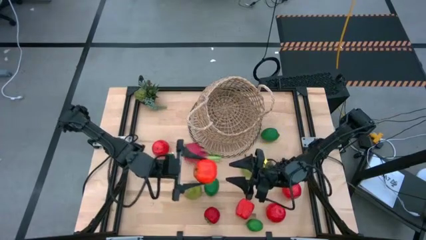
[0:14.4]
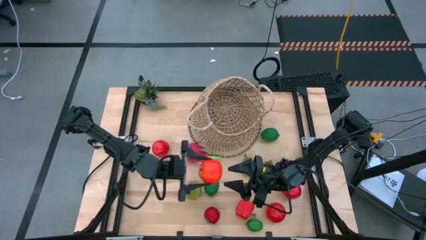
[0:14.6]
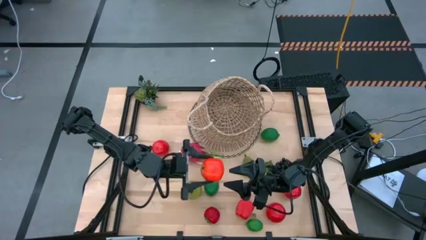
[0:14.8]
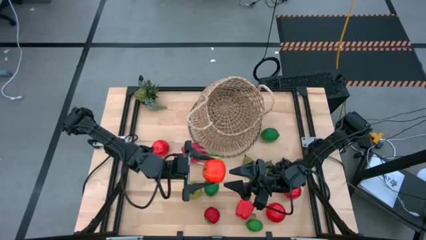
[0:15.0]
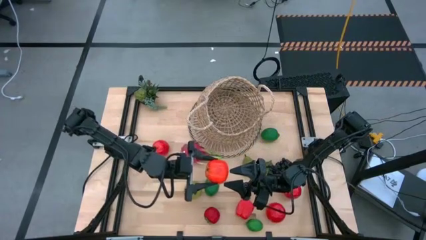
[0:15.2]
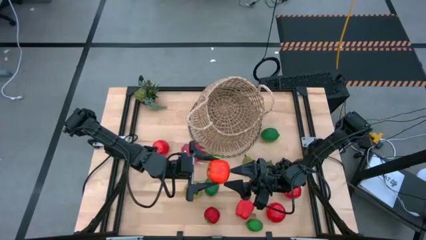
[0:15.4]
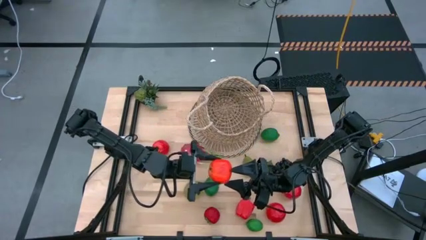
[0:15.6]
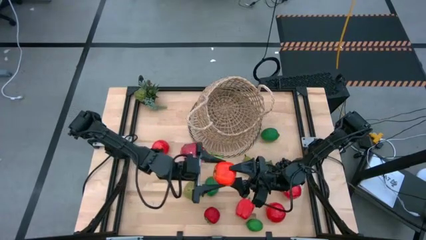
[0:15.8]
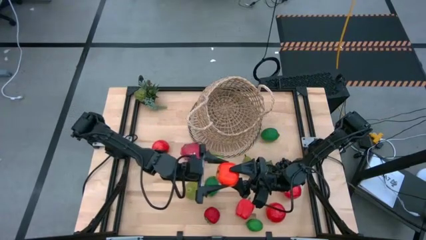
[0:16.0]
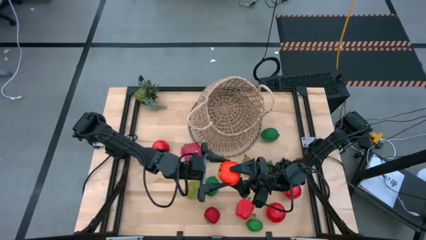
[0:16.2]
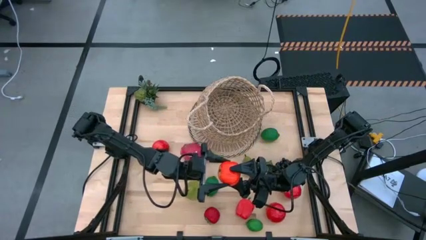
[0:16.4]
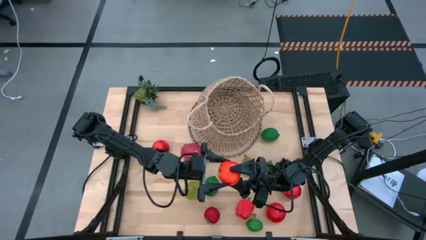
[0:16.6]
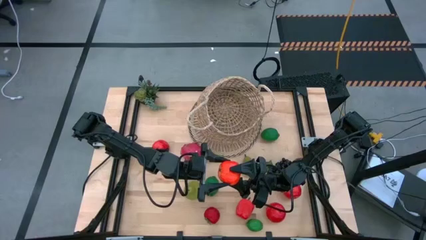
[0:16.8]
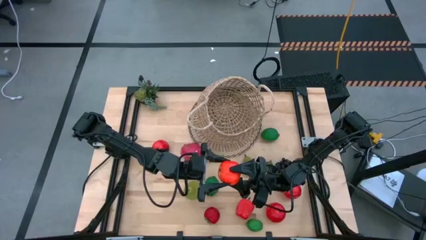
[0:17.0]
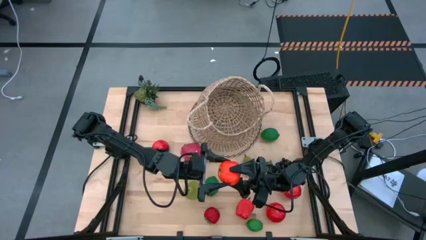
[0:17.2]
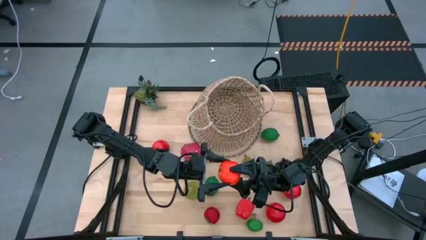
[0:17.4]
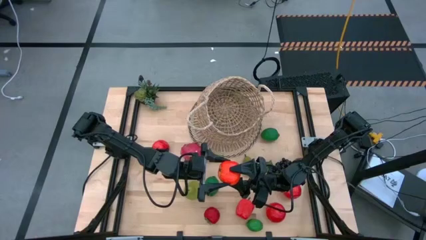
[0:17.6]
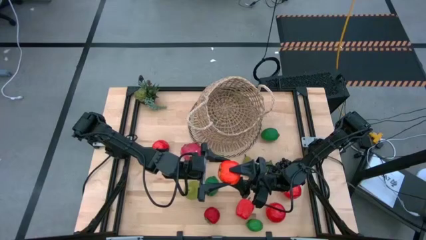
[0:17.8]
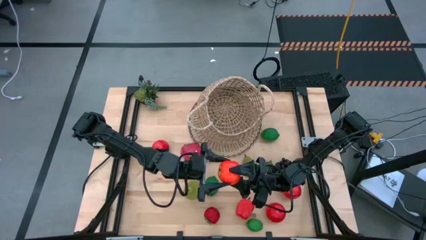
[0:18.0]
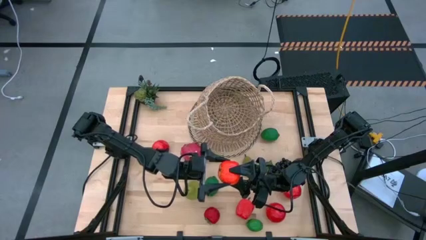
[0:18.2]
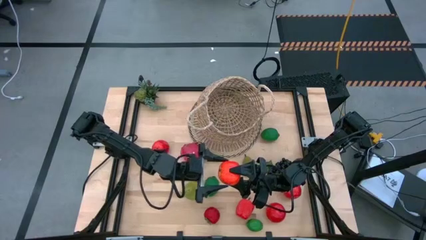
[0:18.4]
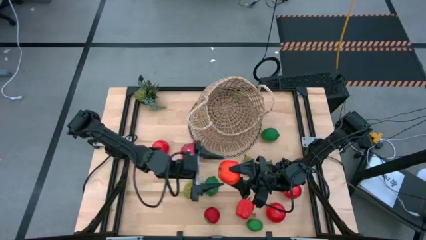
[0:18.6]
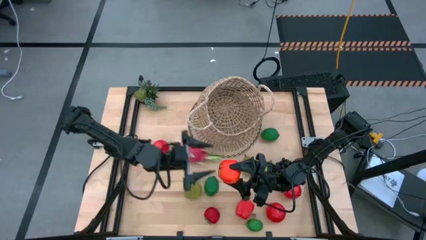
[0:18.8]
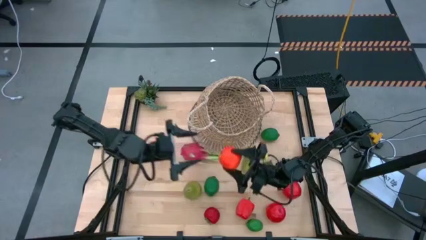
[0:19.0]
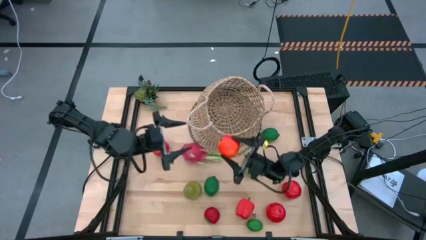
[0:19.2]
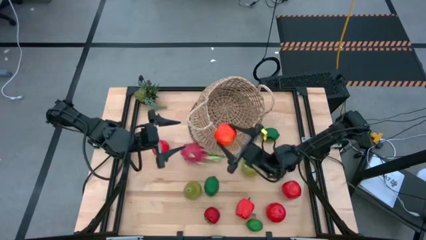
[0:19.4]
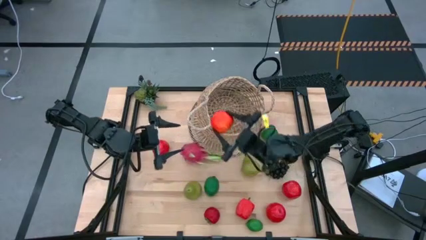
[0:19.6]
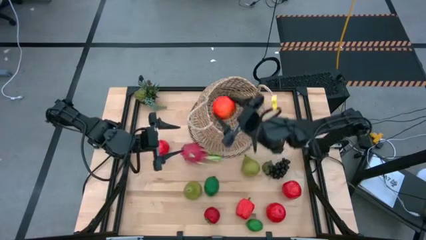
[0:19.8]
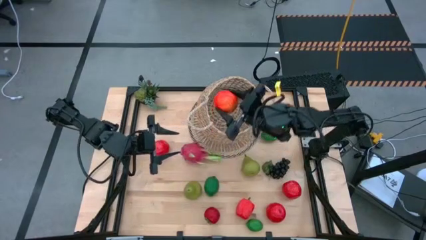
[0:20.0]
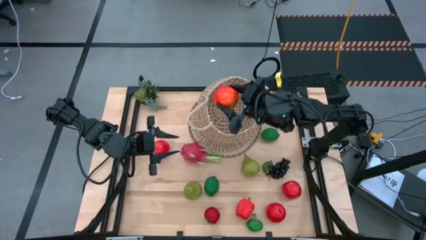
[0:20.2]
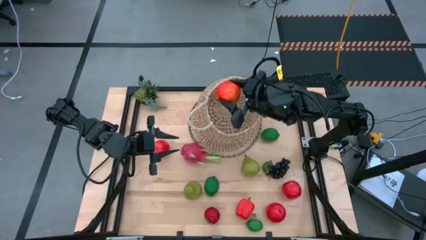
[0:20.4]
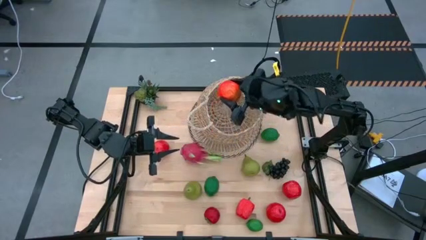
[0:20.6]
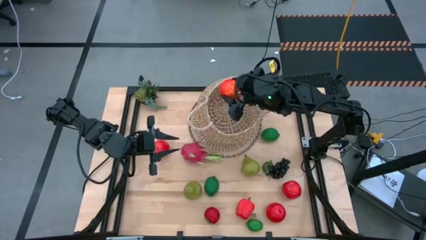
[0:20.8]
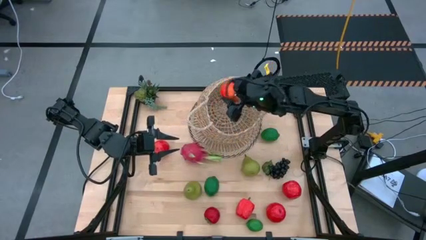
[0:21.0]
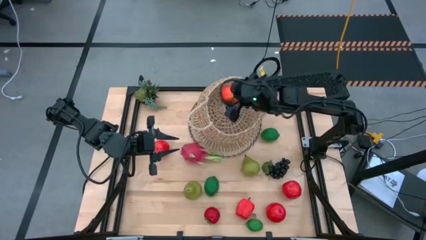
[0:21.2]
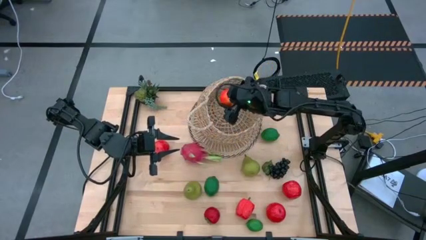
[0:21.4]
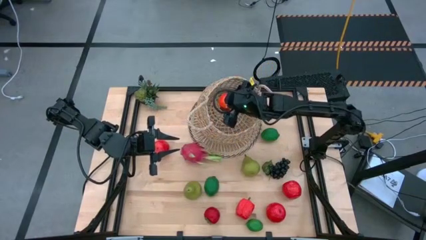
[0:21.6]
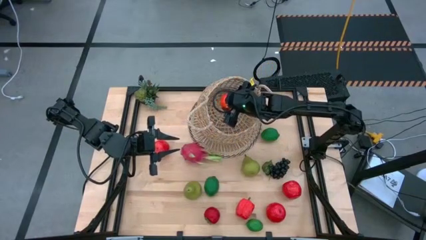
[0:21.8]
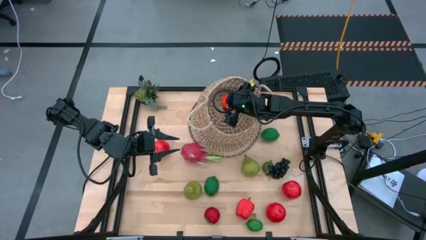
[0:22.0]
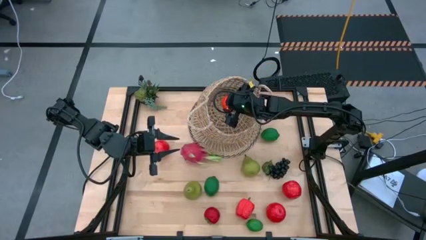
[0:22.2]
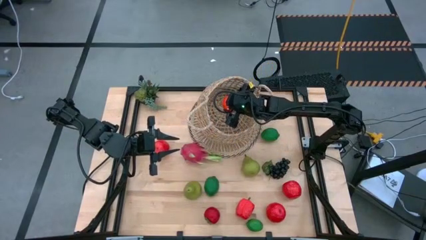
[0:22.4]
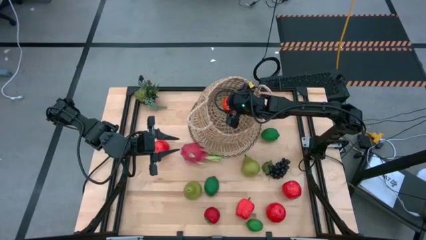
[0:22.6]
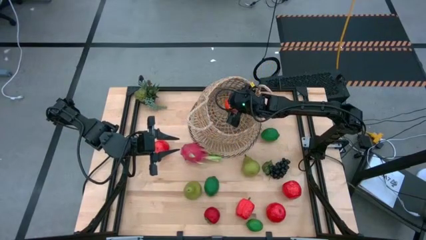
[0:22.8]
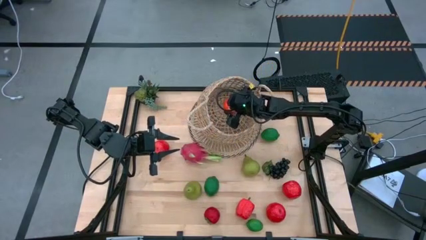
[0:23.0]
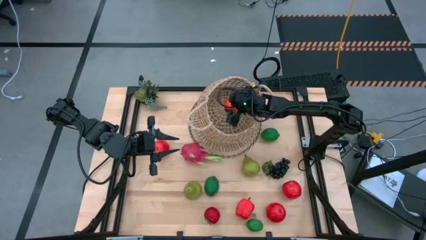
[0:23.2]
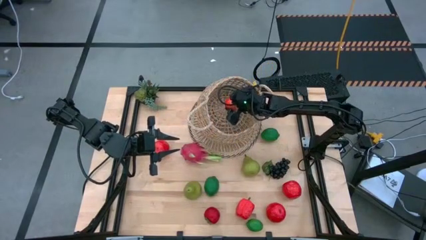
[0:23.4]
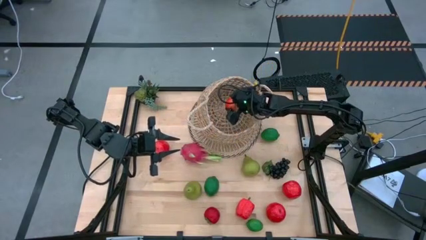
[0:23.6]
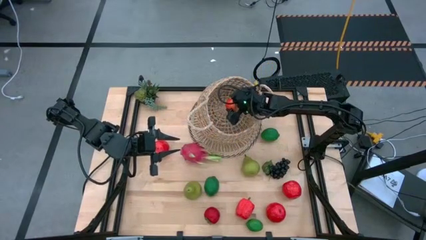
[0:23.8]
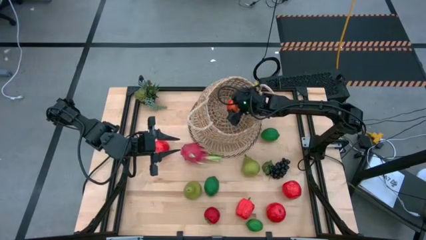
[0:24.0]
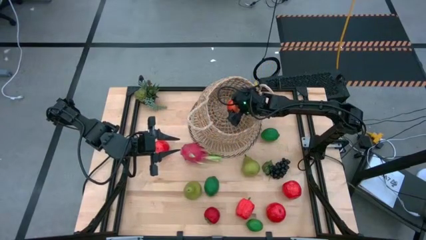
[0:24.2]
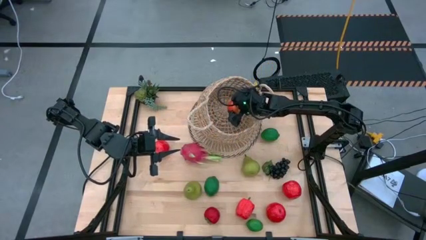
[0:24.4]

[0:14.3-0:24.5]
Task: Build produce basket
Put the red apple into the basket
